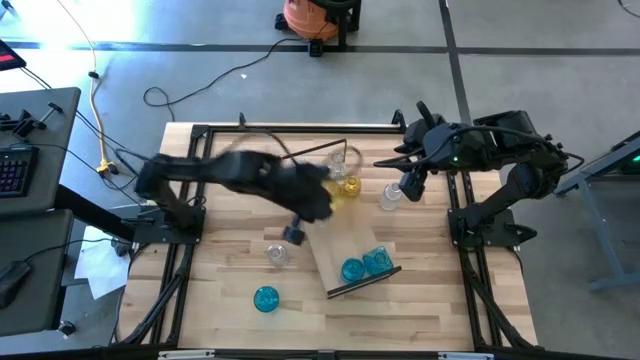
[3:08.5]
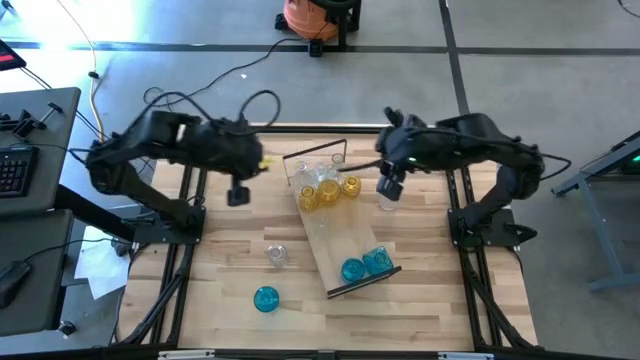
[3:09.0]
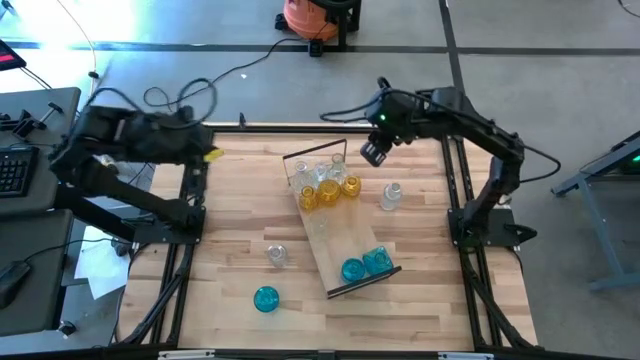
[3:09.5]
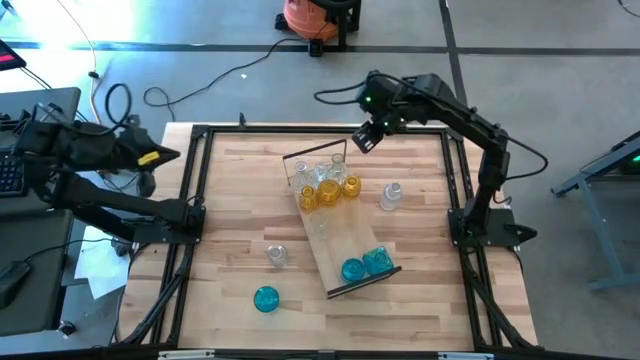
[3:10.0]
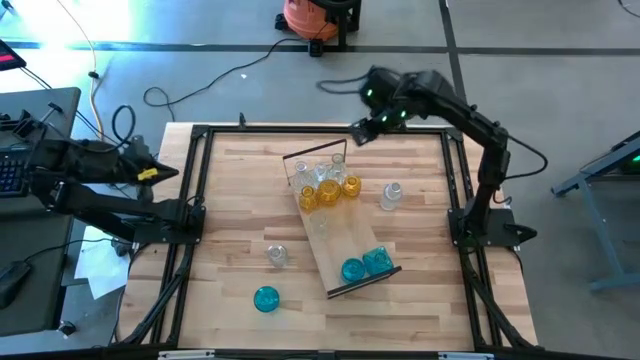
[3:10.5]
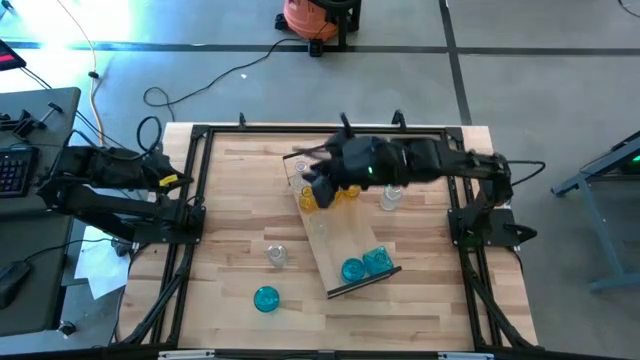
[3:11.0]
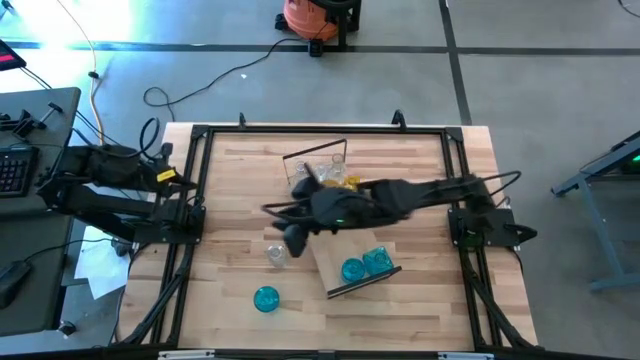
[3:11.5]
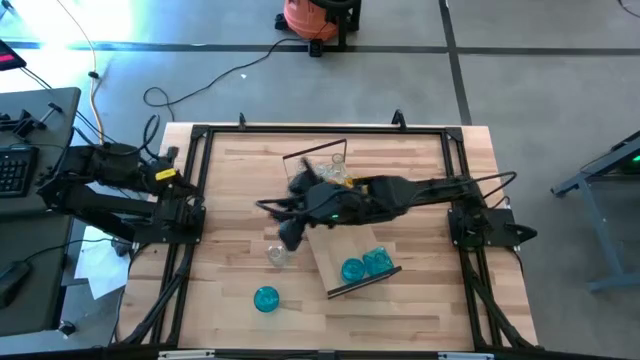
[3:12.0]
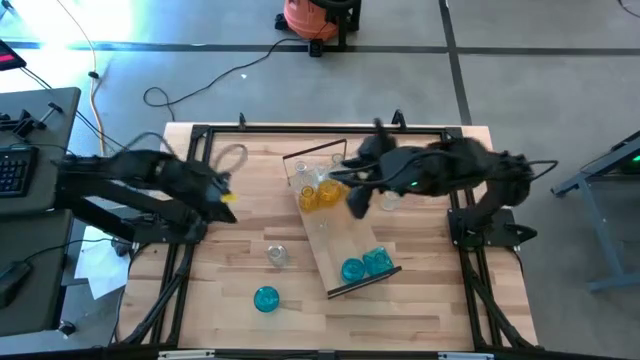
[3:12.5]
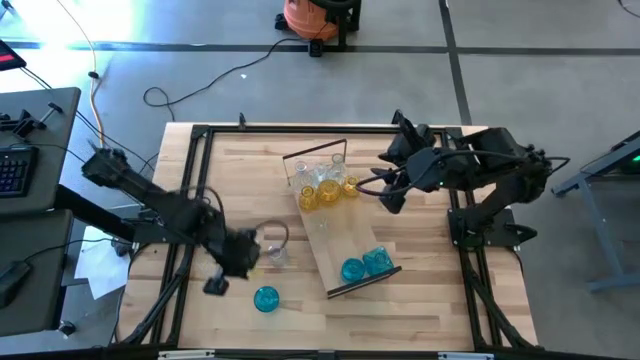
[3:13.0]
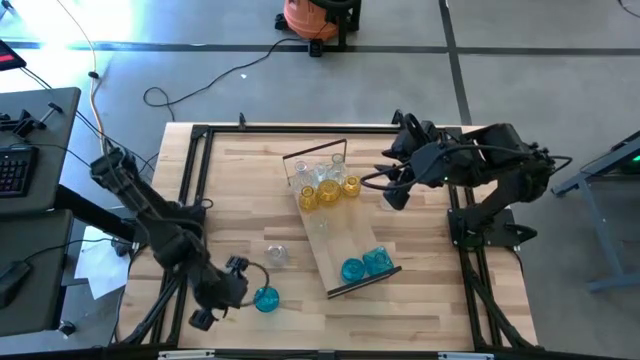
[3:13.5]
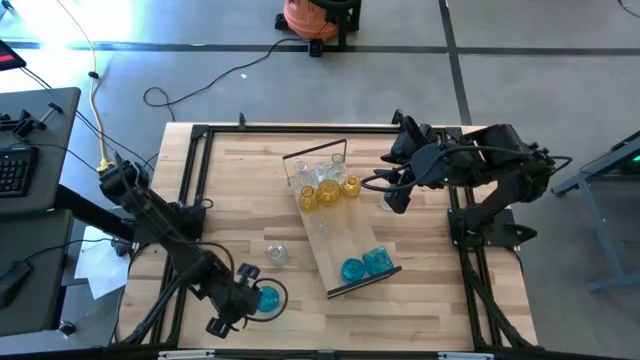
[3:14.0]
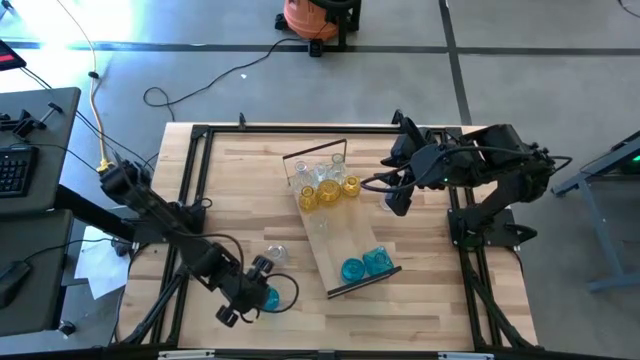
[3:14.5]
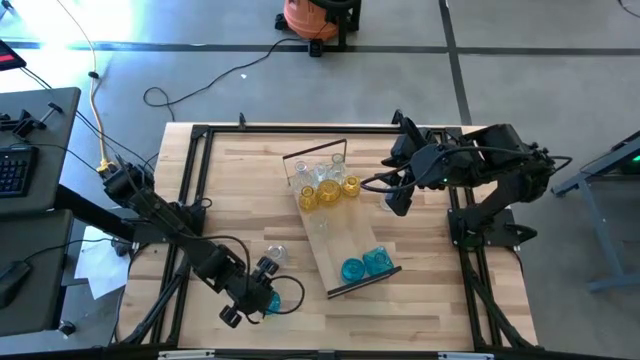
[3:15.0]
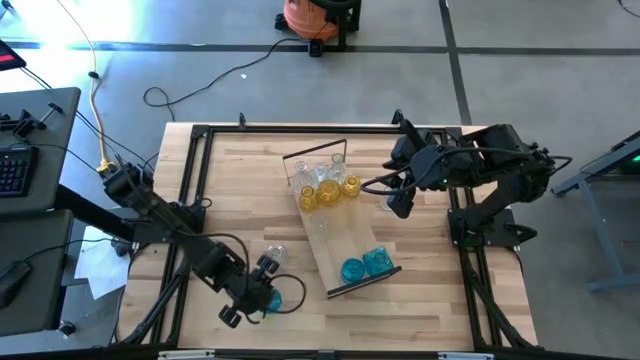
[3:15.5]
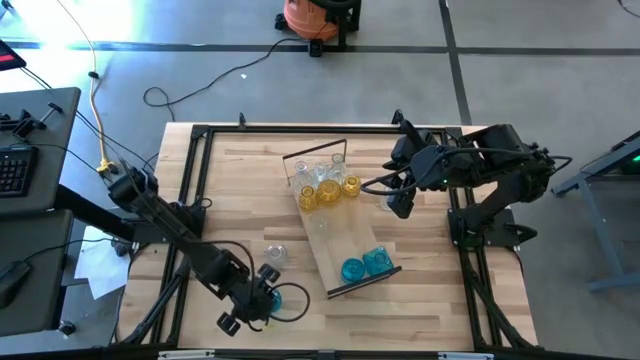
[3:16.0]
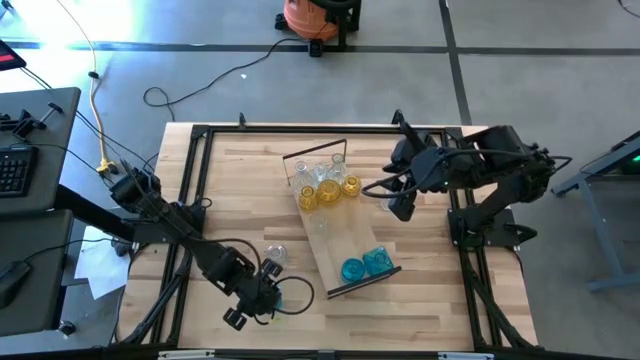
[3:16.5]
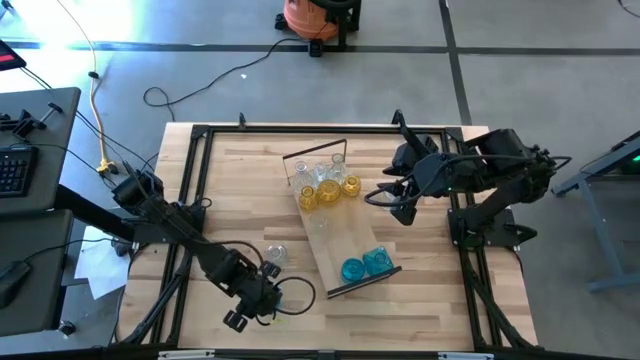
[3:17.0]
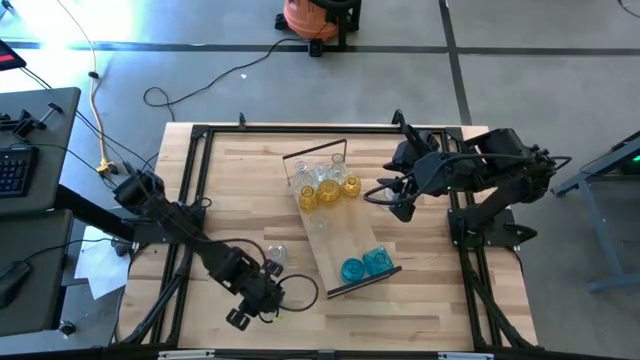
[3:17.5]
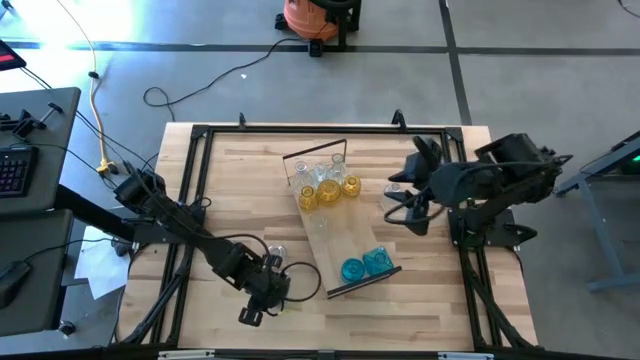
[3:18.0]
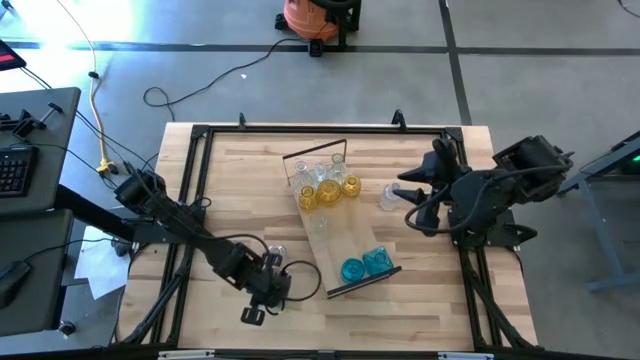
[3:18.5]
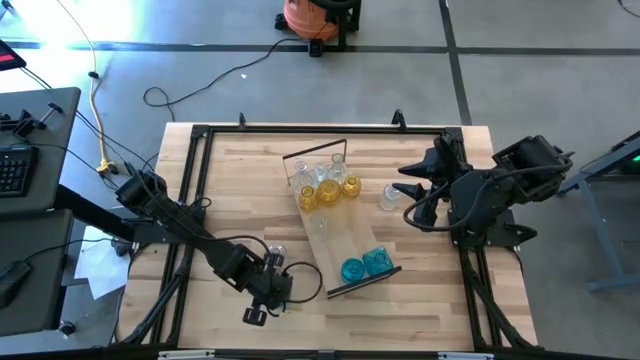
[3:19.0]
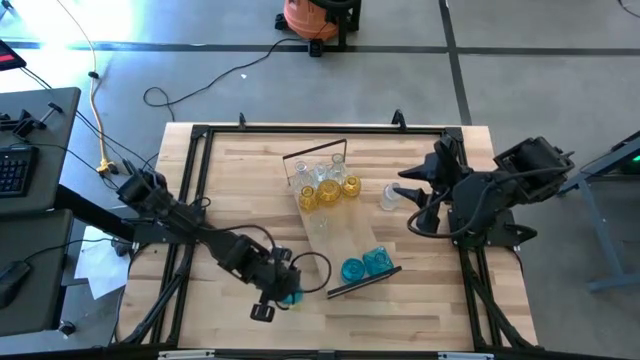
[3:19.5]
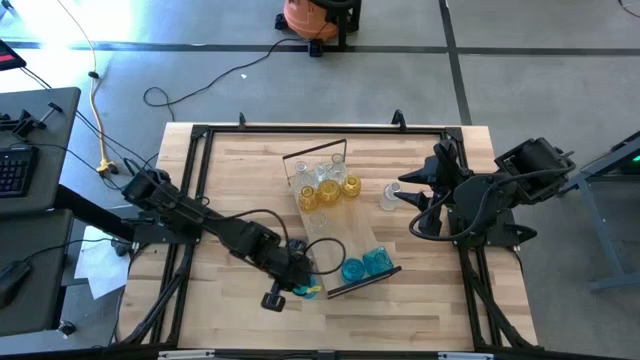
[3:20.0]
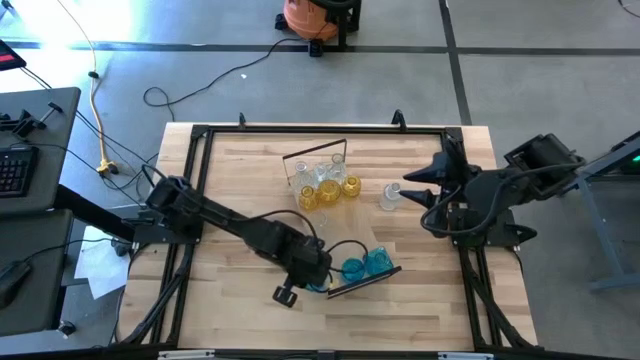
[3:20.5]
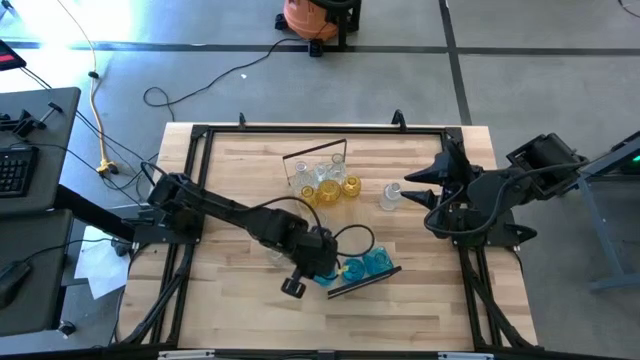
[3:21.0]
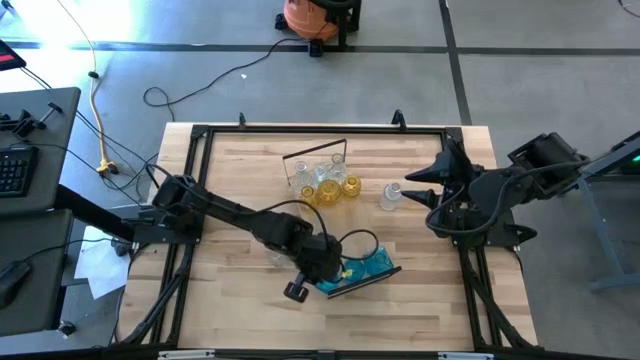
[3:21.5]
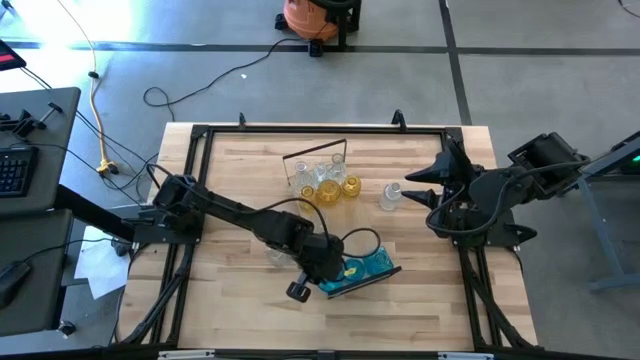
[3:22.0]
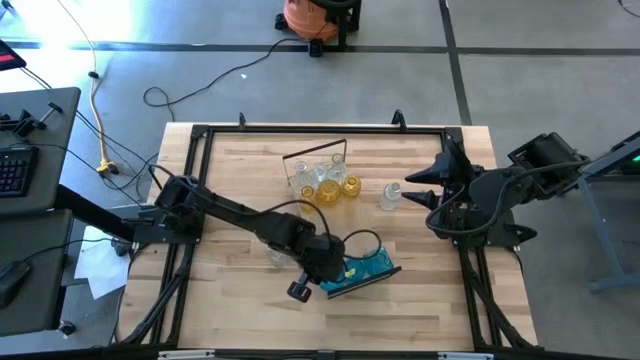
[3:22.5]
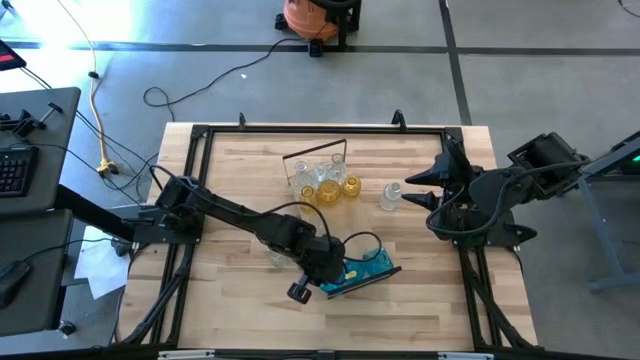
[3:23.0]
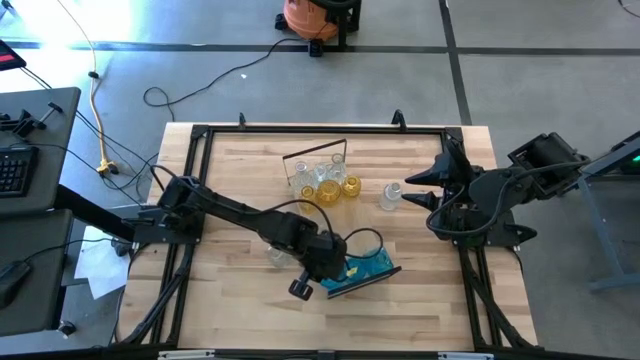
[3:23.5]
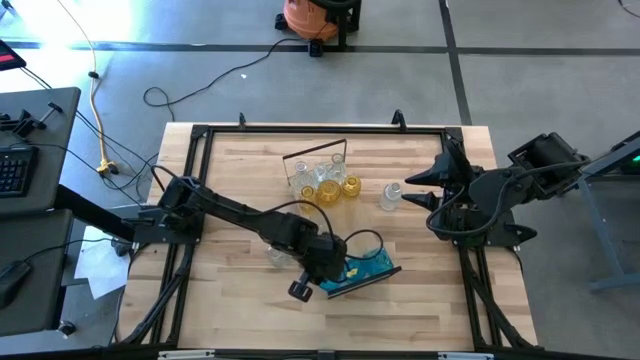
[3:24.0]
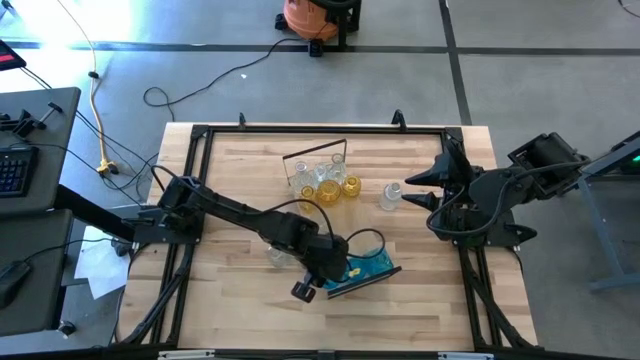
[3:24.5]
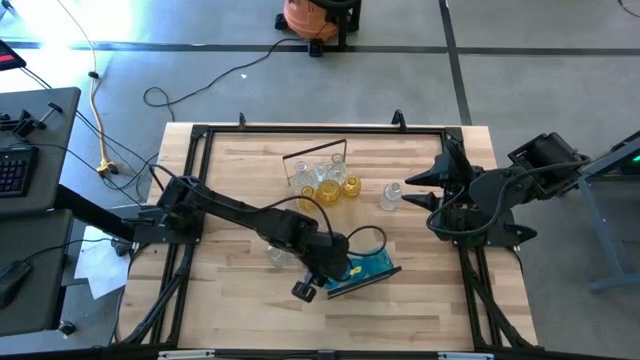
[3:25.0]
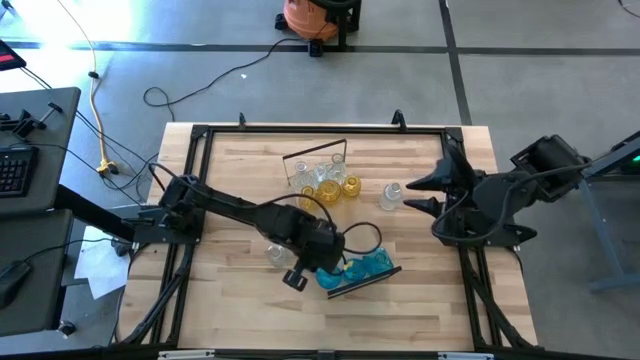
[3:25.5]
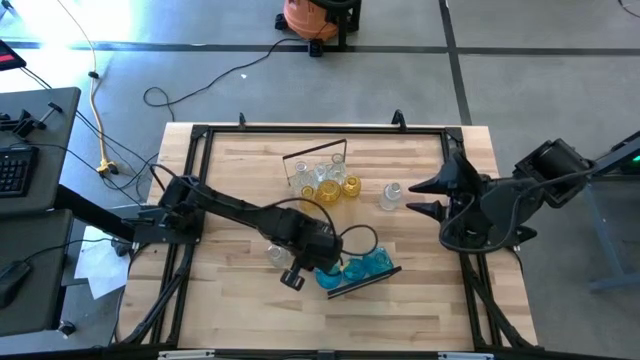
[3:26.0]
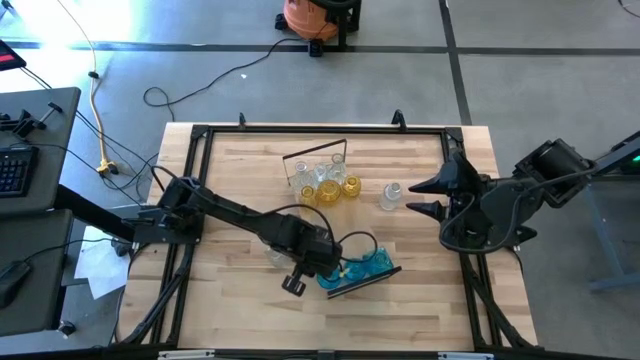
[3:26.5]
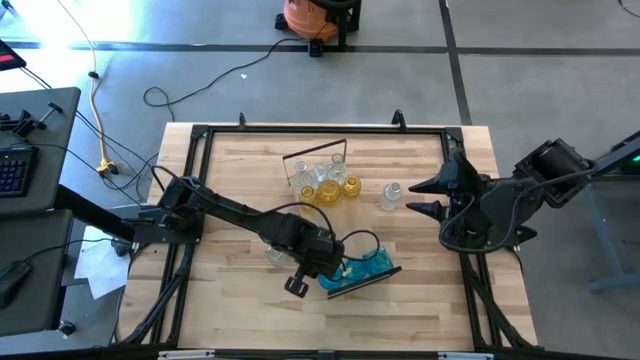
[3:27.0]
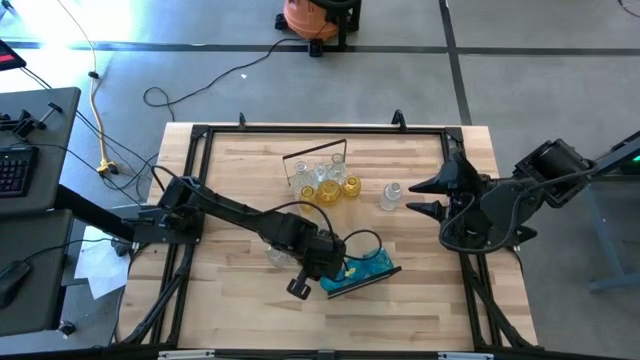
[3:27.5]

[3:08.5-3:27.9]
Task: sort vases onto shelf
Put the blue crystal vase on the shelf aligned with the other blue crystal vases
